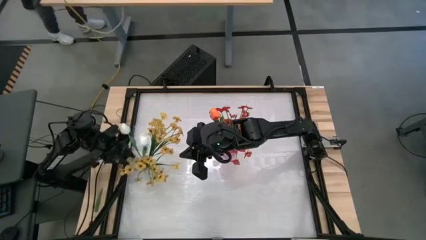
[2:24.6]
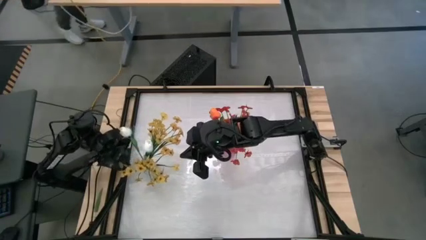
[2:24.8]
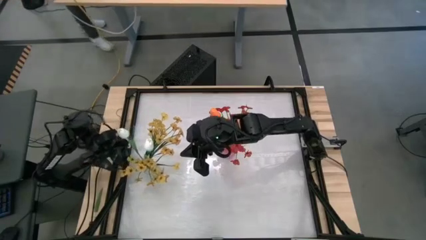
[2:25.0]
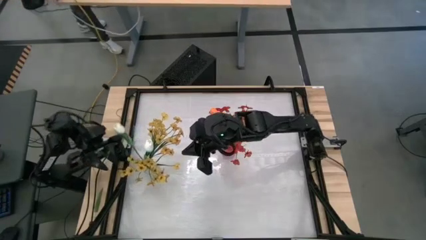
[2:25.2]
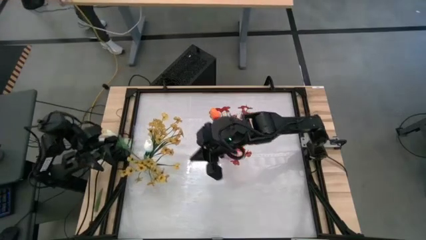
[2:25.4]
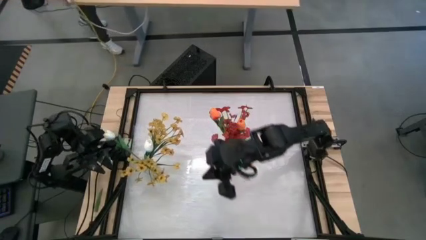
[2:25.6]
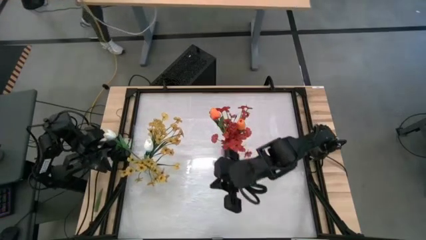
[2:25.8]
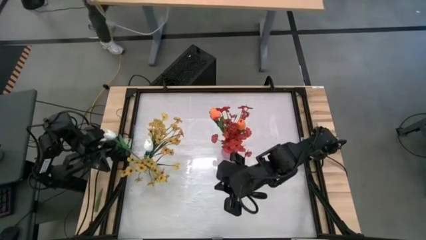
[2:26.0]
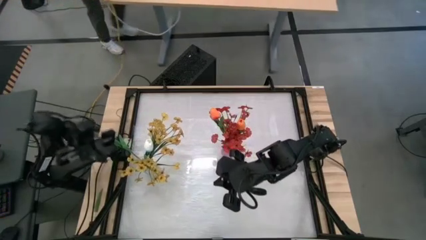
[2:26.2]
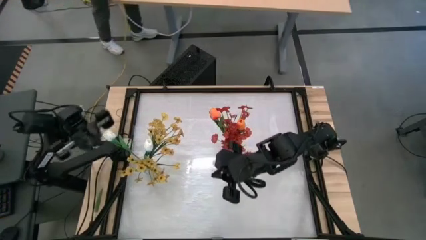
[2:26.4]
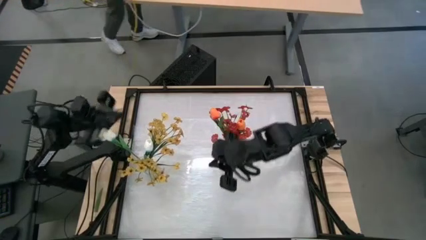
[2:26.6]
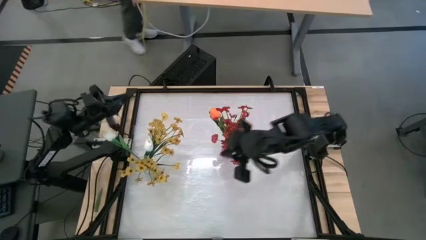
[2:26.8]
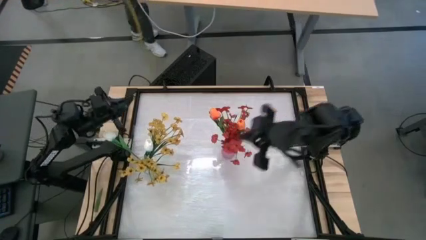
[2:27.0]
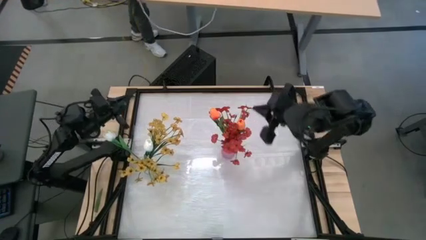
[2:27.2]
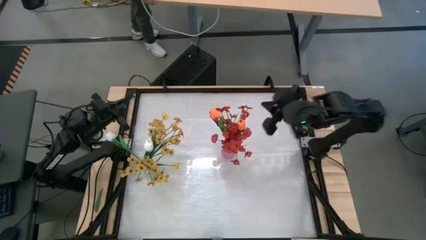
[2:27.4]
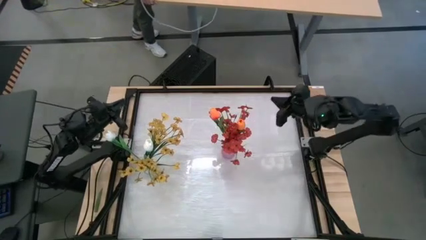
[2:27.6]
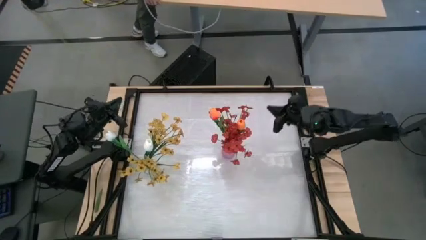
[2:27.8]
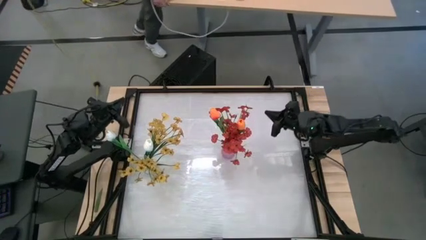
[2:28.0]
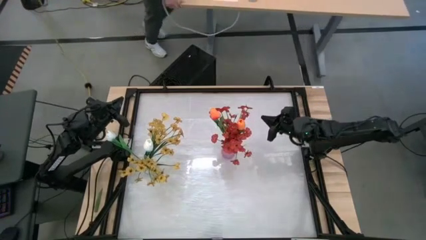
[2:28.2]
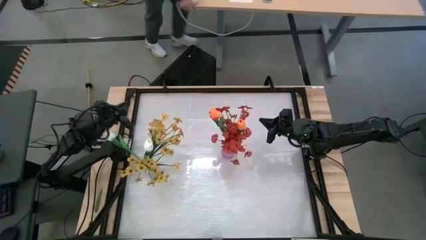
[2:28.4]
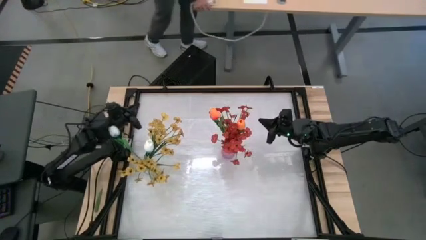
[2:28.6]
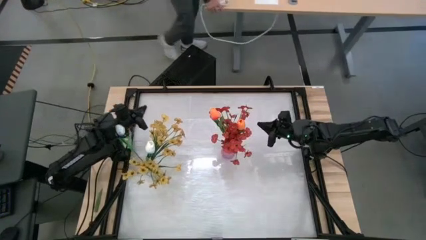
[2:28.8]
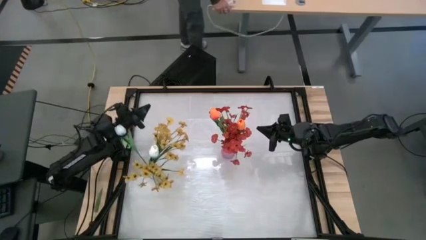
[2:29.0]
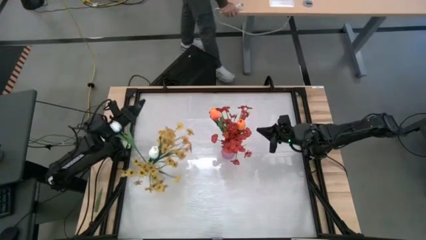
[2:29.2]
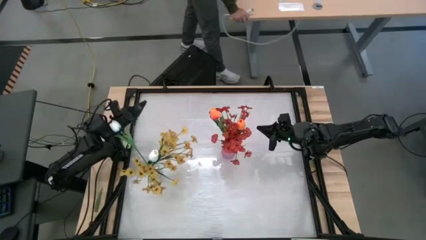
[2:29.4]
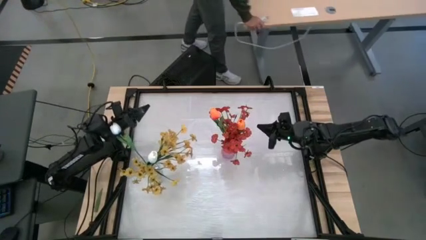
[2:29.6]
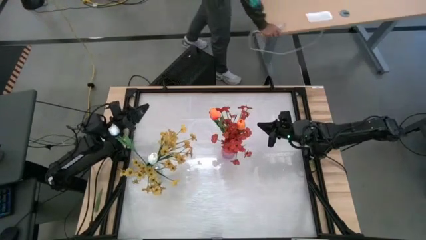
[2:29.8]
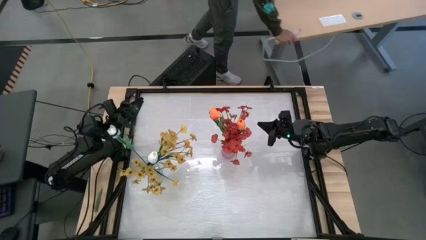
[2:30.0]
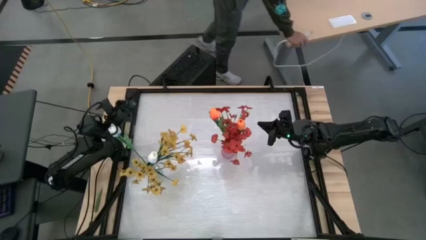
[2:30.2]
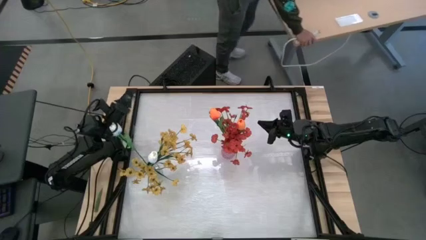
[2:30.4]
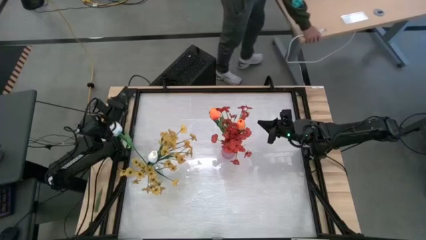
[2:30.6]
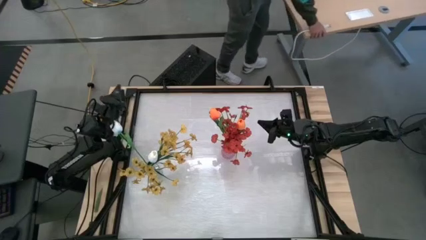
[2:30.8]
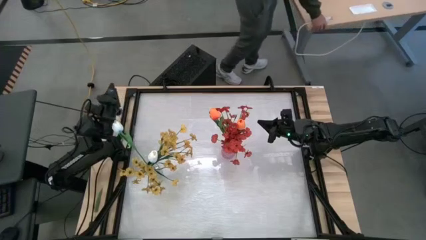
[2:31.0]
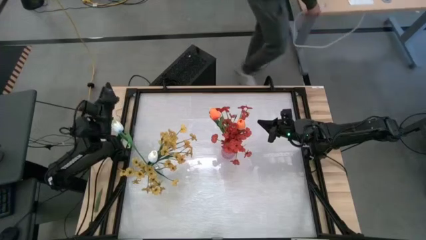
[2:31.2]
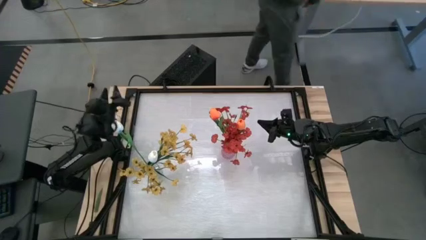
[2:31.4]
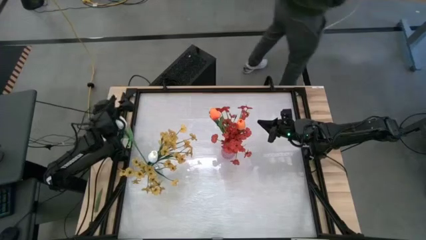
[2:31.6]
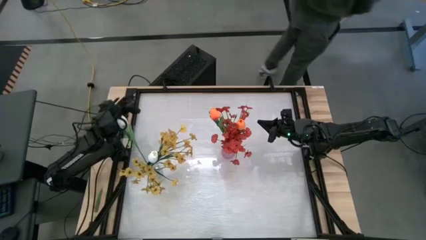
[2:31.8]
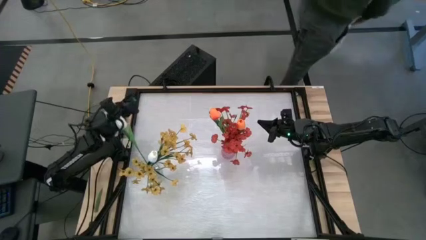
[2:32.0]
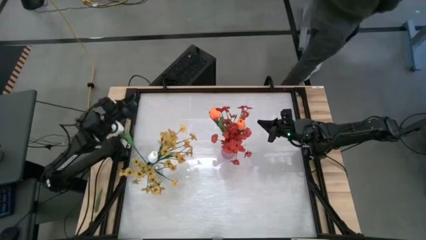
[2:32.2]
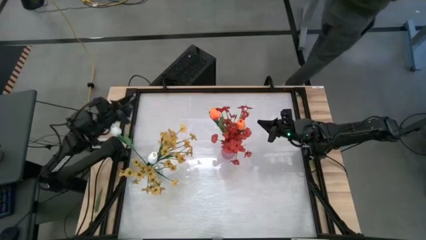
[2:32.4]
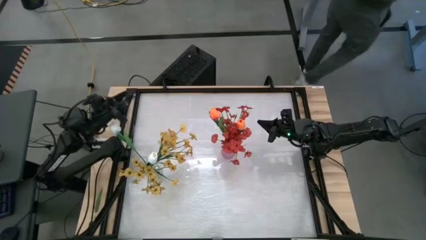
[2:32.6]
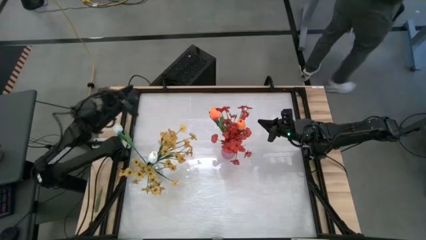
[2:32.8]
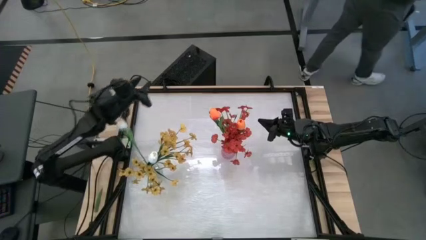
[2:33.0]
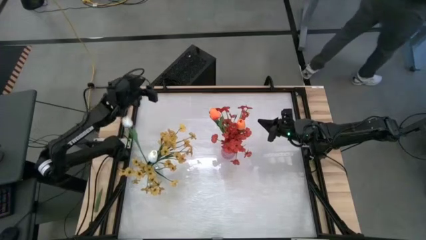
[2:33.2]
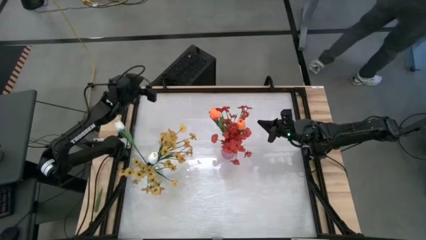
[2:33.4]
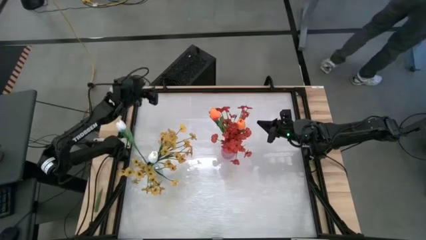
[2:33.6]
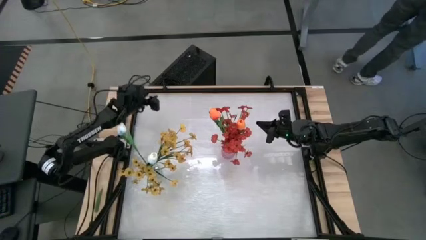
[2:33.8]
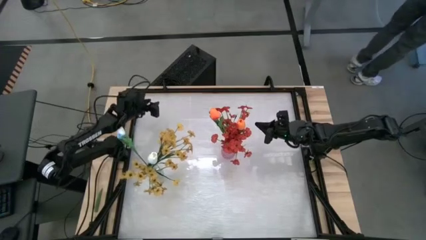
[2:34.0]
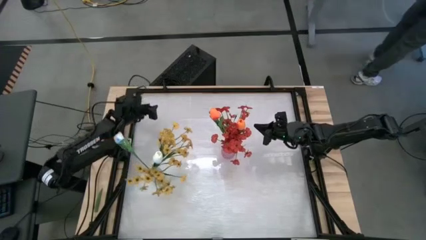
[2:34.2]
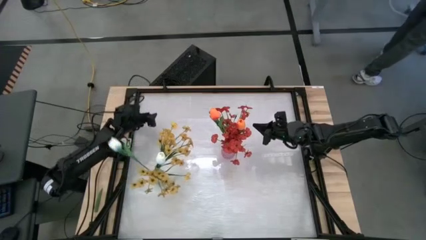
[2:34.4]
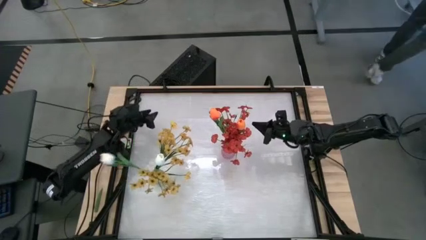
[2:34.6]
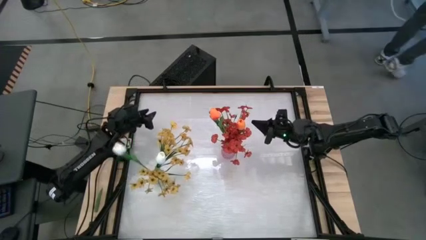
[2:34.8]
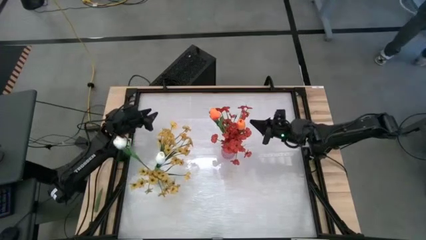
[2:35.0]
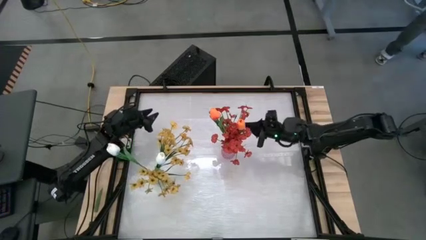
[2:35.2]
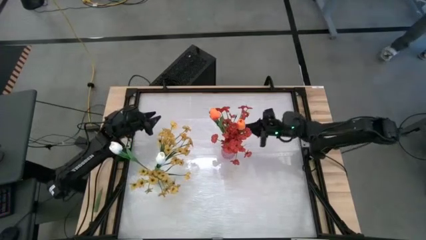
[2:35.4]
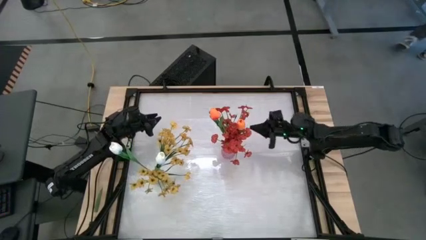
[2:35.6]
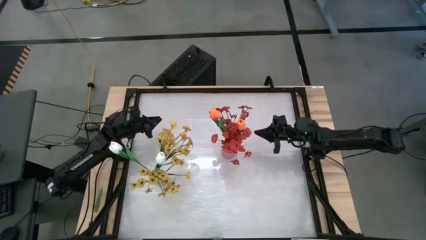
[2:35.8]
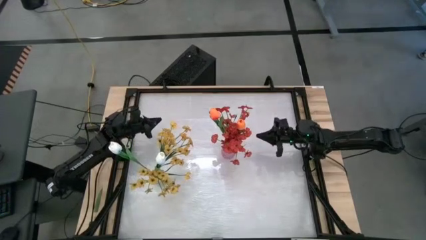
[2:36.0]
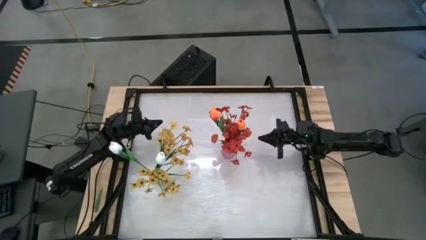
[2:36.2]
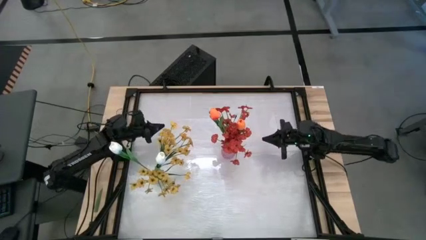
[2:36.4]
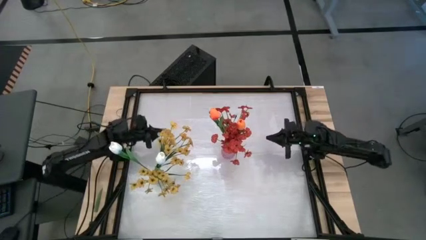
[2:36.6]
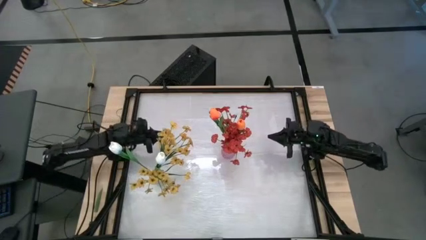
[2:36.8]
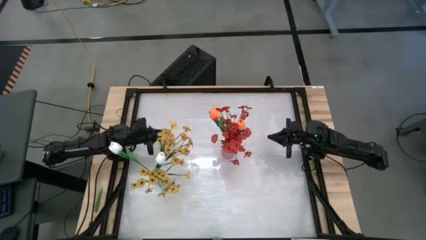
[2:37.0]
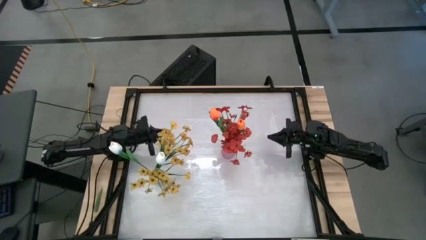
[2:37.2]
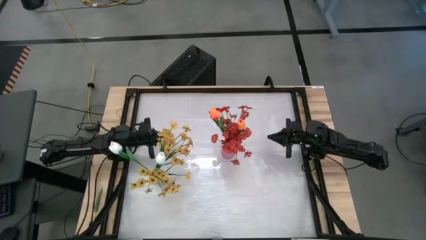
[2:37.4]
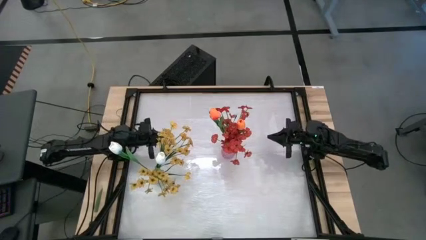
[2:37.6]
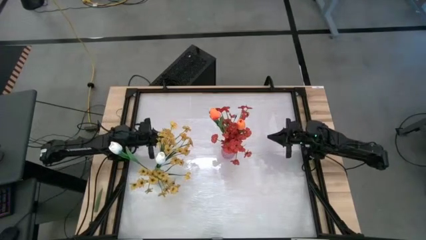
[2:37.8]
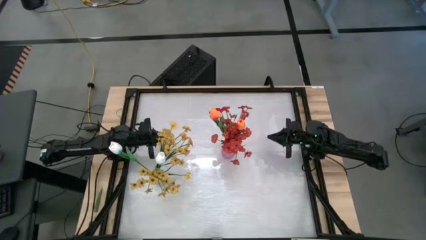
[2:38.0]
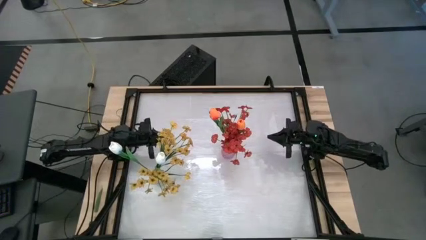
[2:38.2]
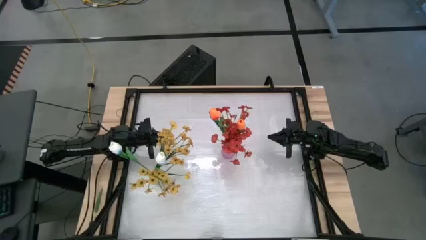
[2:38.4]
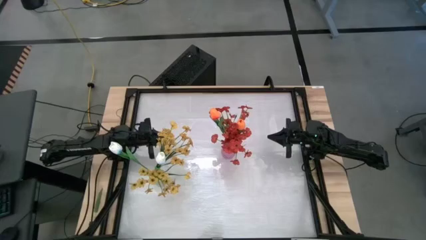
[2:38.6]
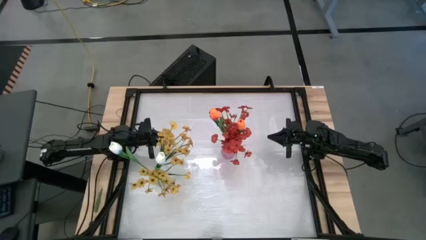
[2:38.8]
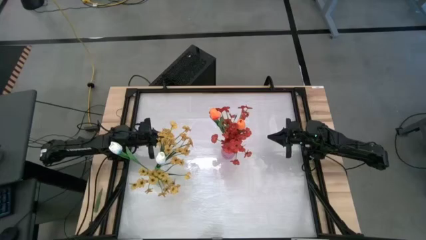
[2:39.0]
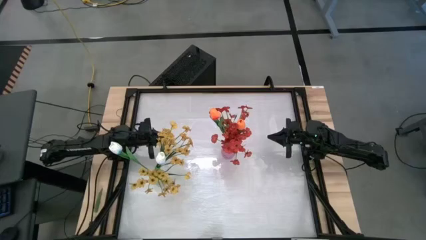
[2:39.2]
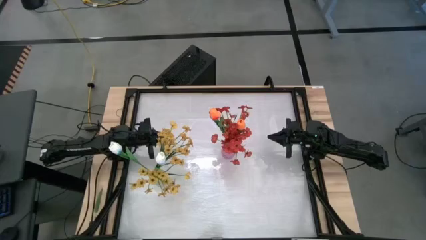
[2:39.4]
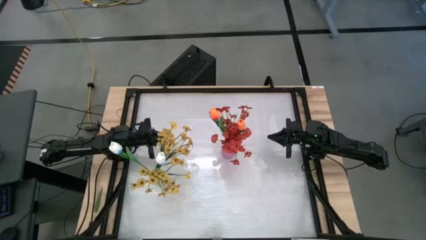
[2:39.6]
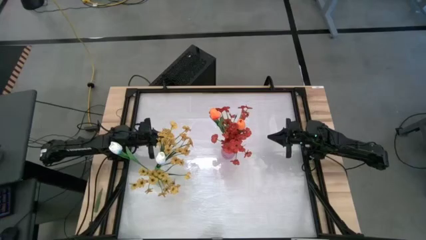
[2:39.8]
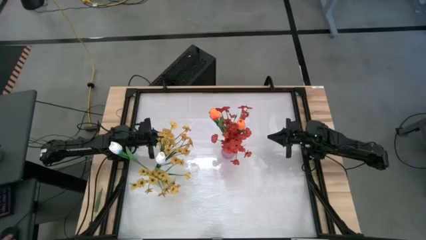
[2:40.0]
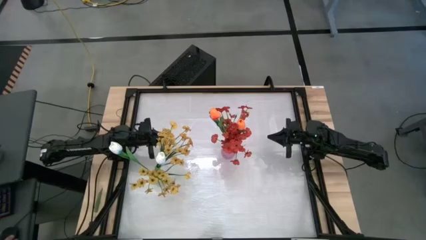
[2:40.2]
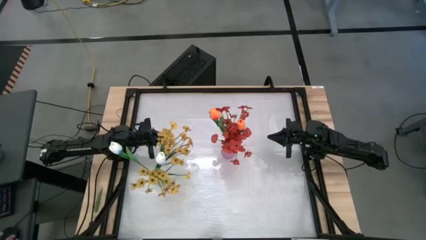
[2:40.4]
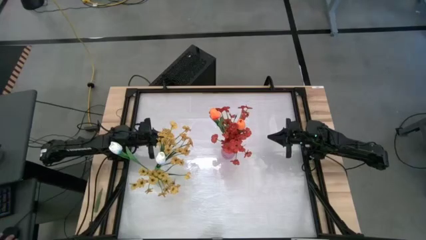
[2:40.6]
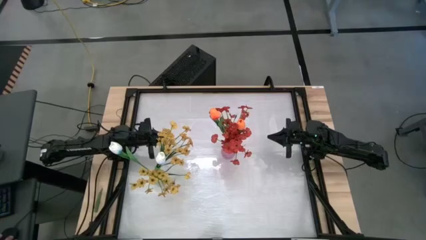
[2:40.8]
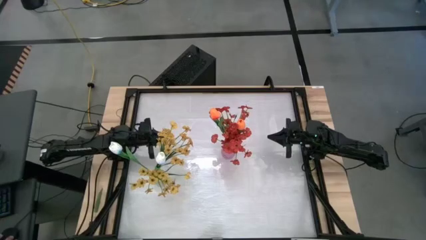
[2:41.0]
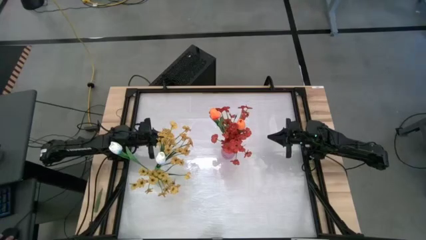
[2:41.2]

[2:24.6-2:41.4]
Task: Sort flowers into vase by color
Return to Home Position
